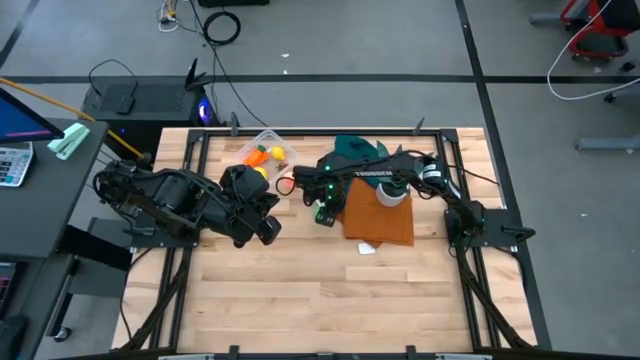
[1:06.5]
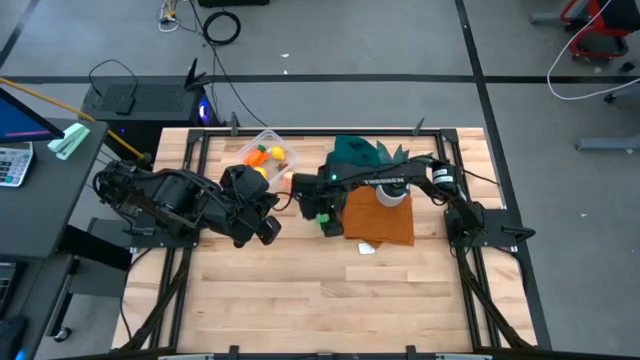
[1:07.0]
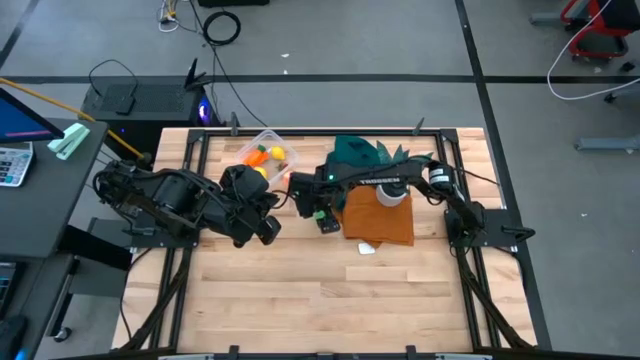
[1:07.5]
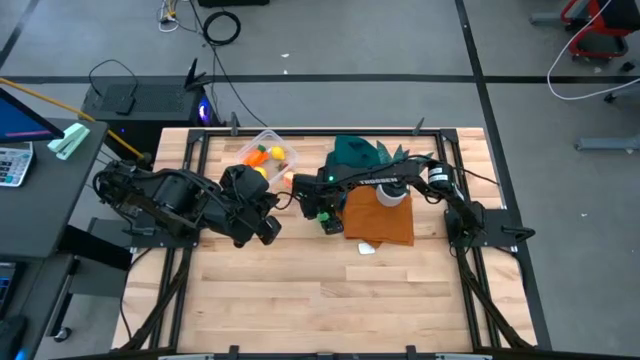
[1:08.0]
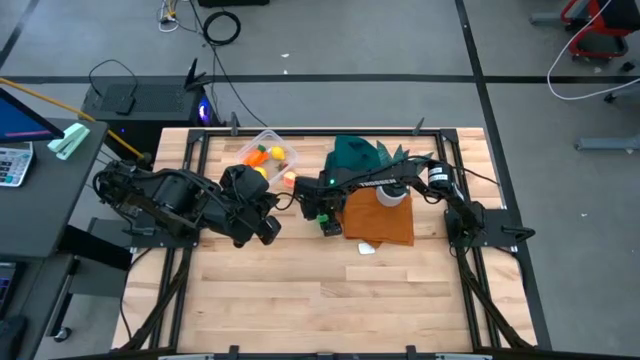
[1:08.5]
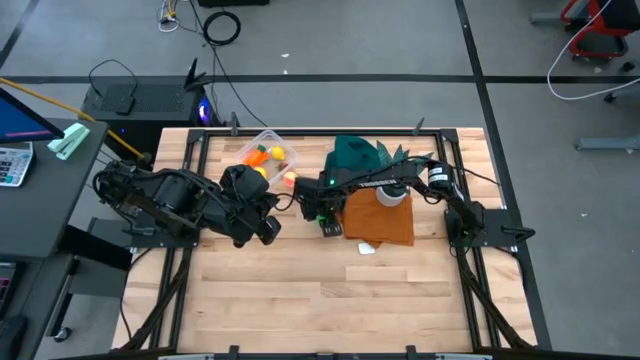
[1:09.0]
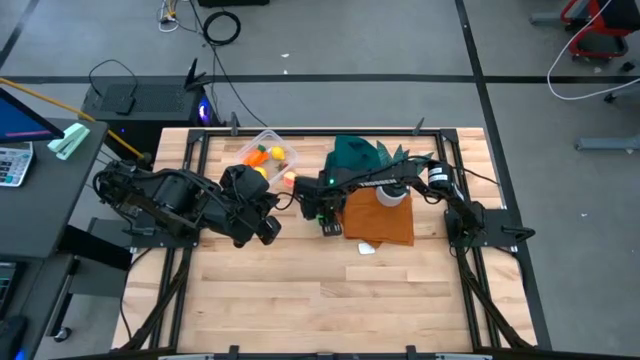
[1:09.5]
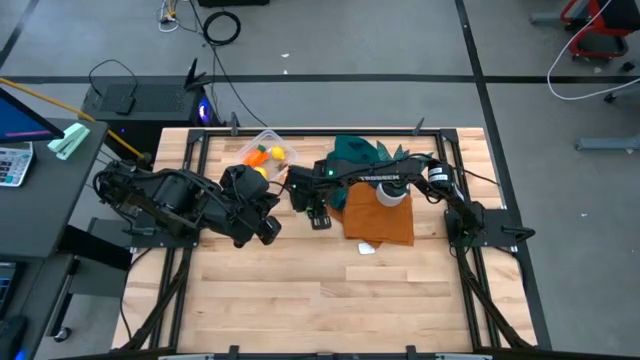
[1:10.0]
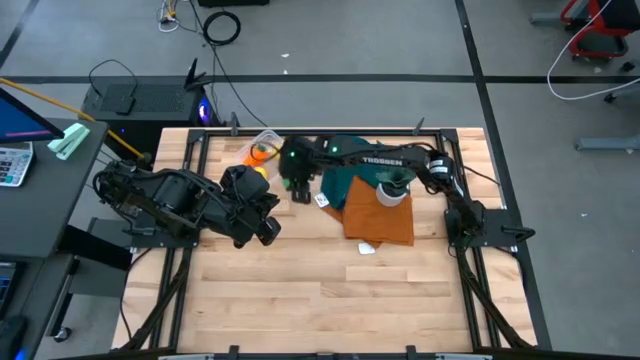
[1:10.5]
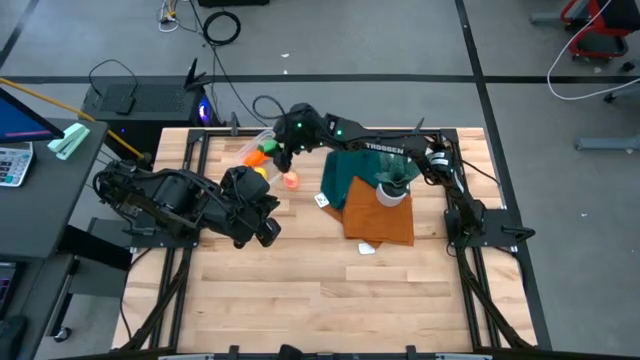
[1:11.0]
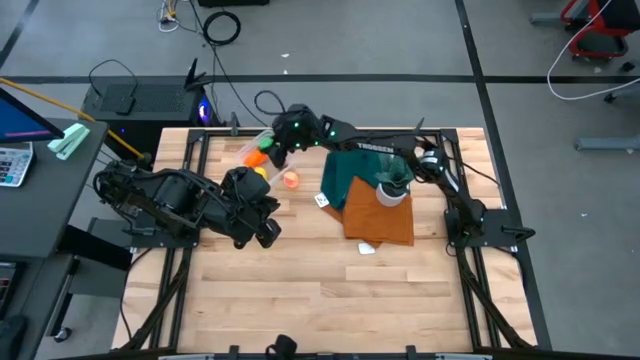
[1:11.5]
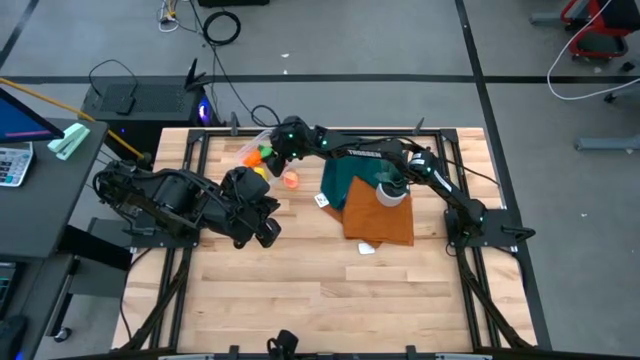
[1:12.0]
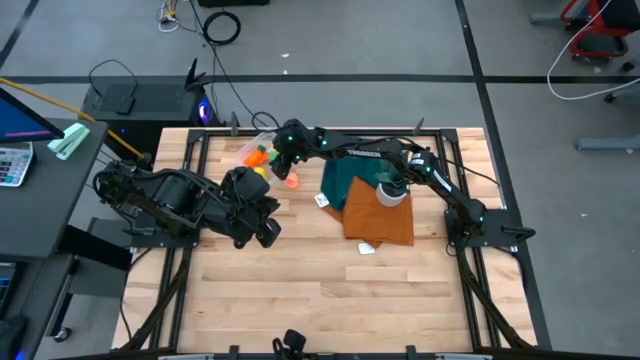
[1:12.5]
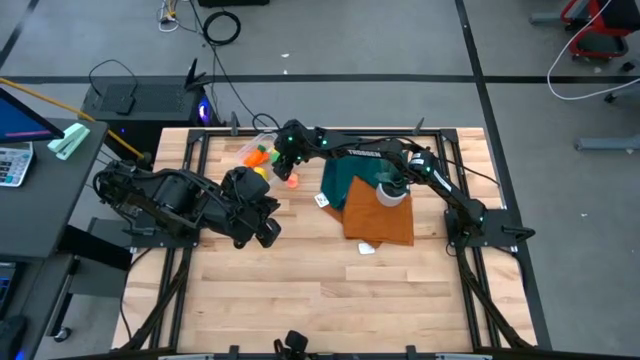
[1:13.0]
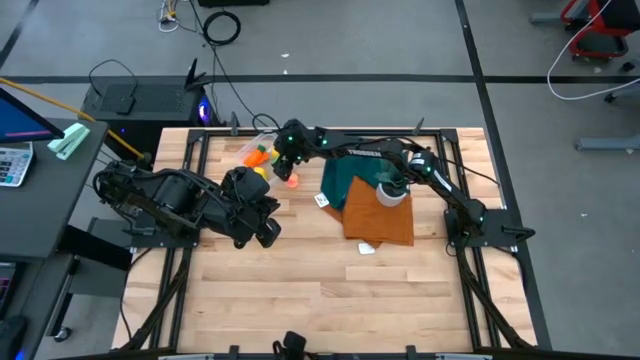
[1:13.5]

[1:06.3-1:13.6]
Task: Pick and placing Produce into tupperware
Put the pear into the transparent container

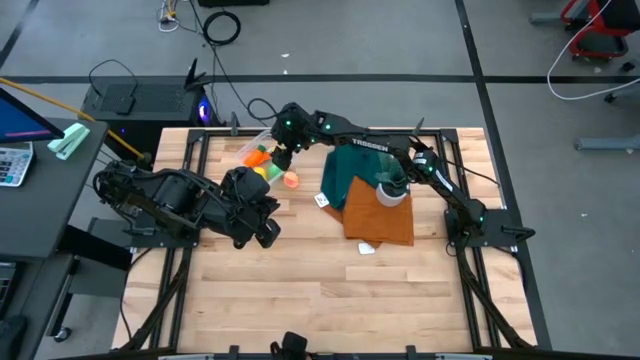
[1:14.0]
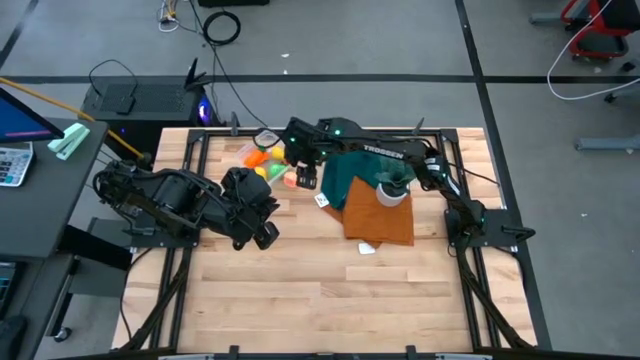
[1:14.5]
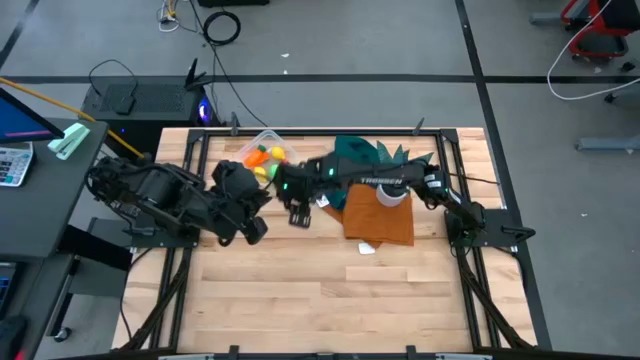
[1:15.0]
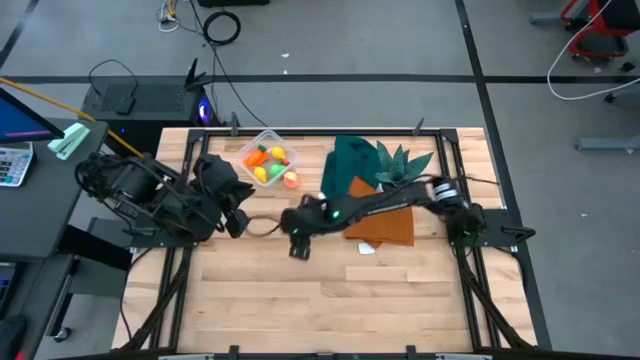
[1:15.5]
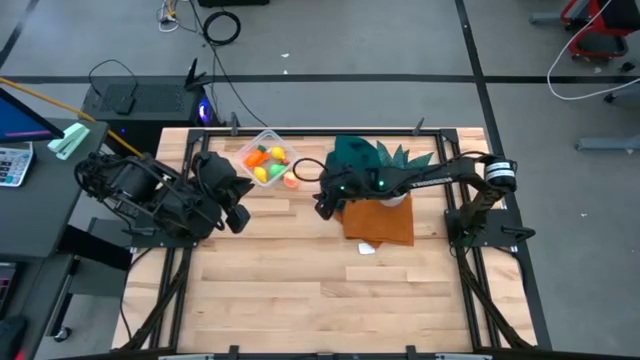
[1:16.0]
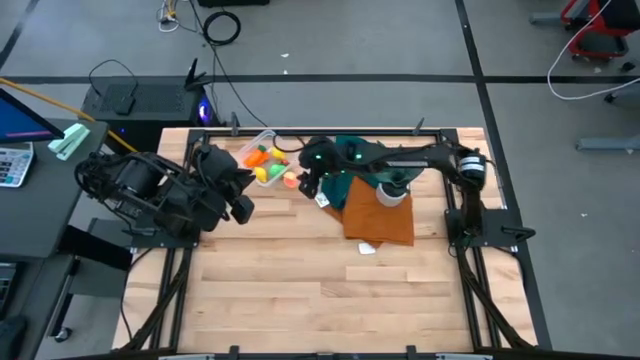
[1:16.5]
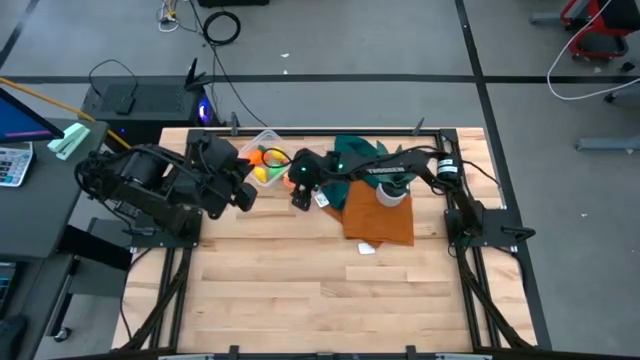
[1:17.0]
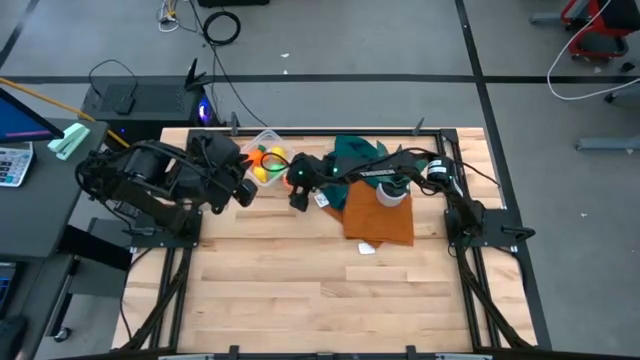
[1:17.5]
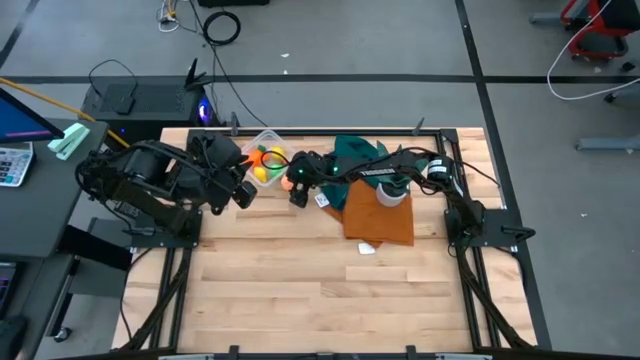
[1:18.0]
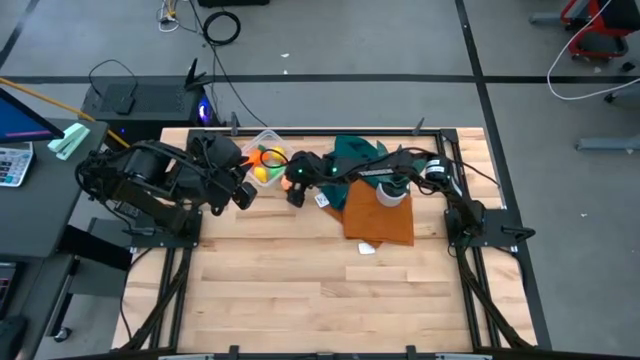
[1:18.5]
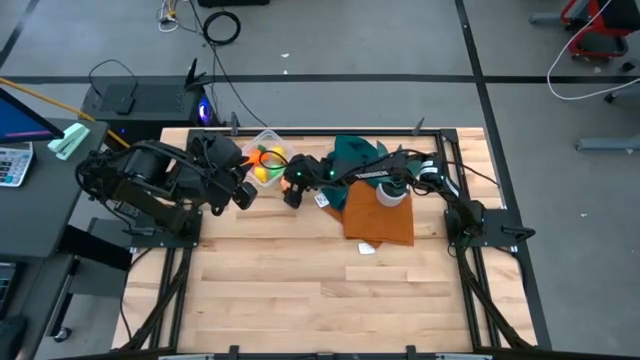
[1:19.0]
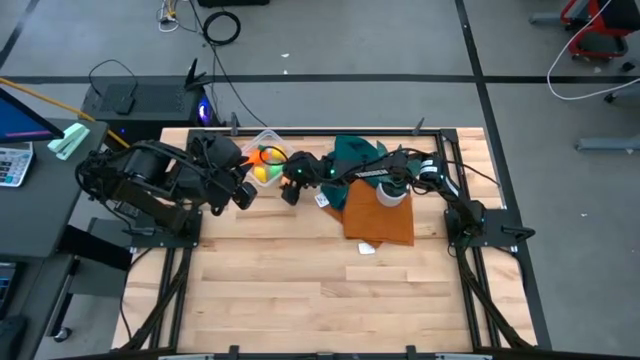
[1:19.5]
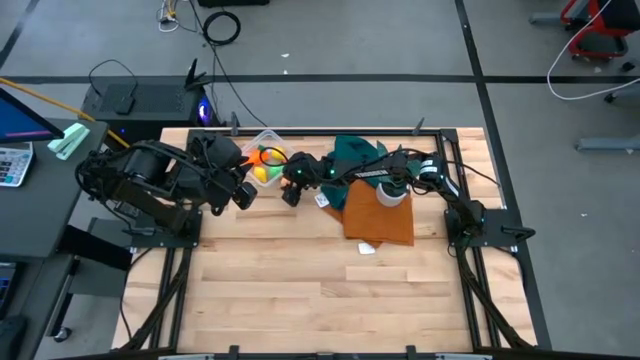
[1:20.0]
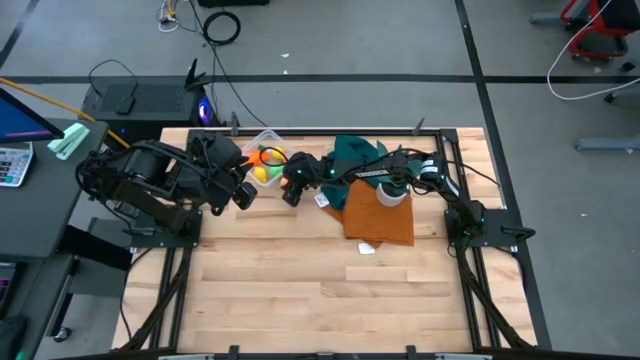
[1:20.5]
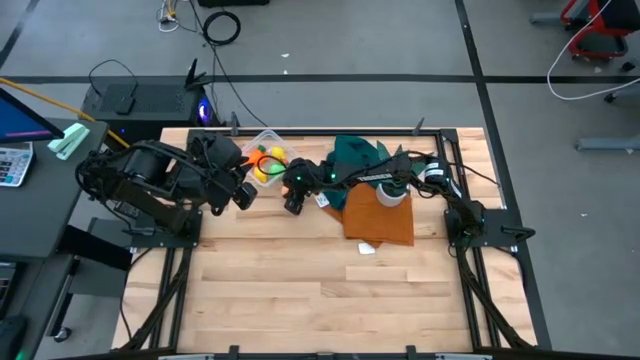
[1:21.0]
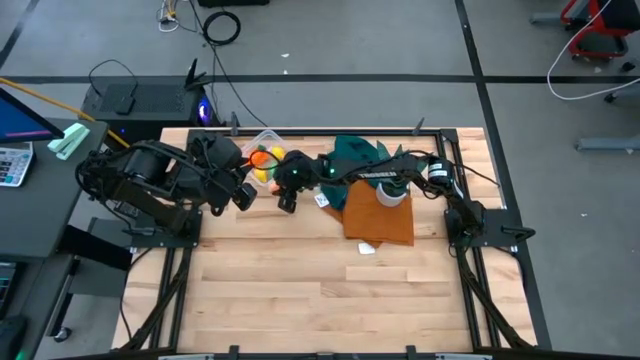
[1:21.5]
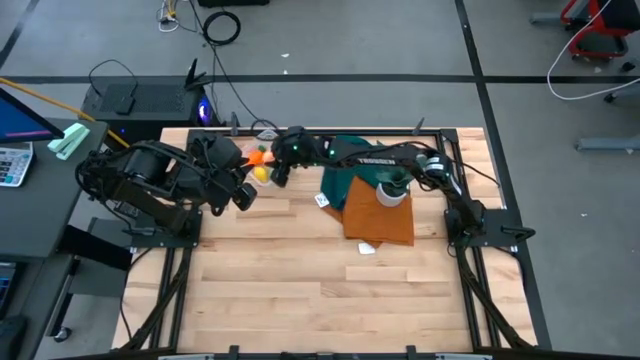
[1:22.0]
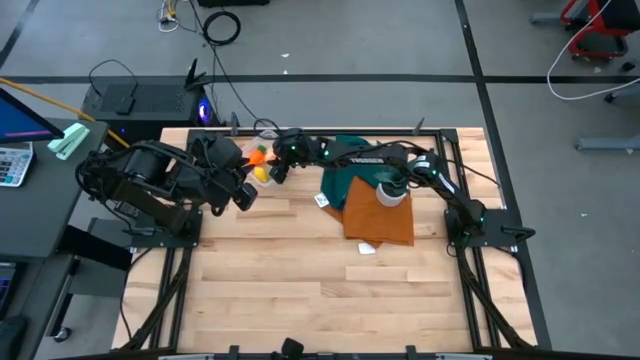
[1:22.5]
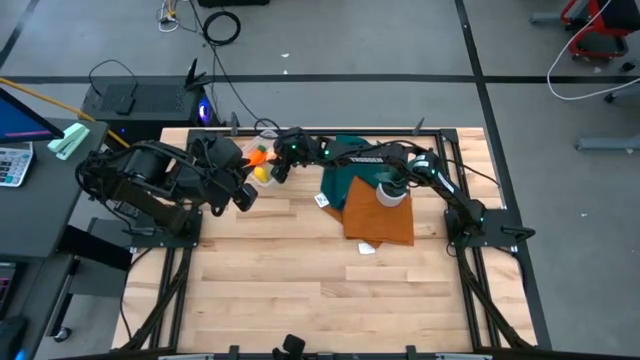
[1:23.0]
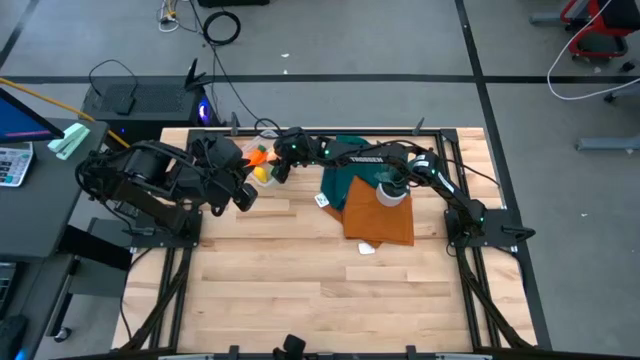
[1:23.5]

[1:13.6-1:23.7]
Put the peach into the transparent container

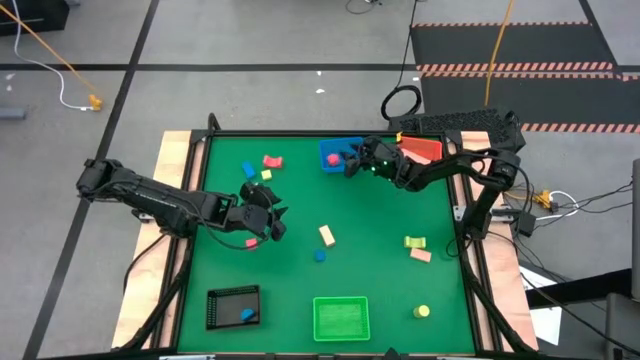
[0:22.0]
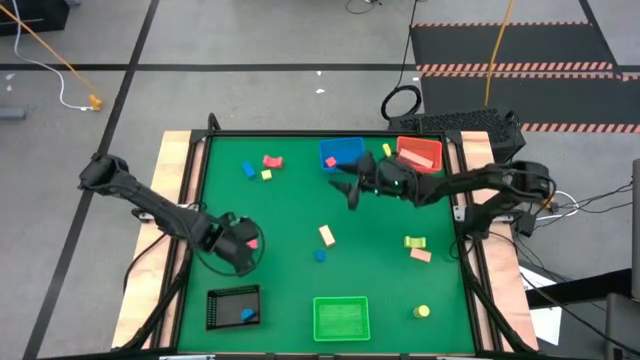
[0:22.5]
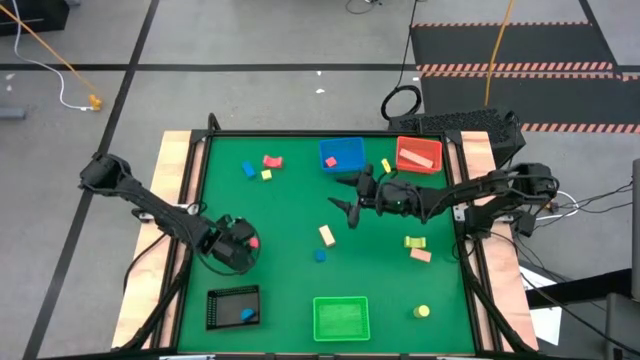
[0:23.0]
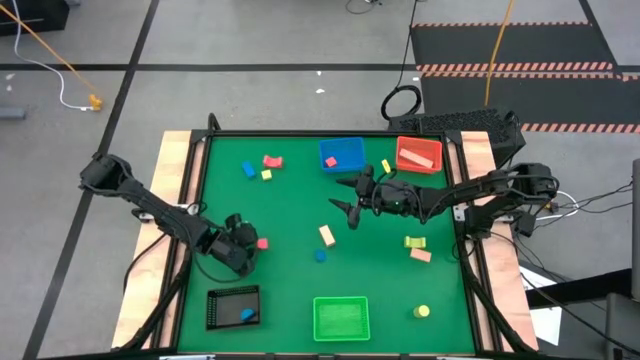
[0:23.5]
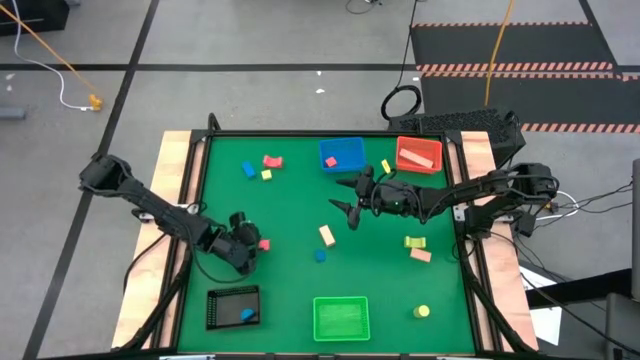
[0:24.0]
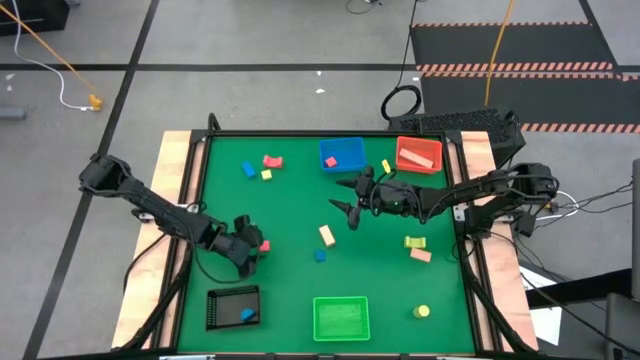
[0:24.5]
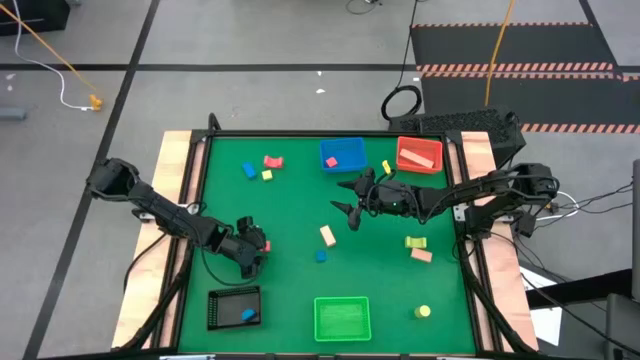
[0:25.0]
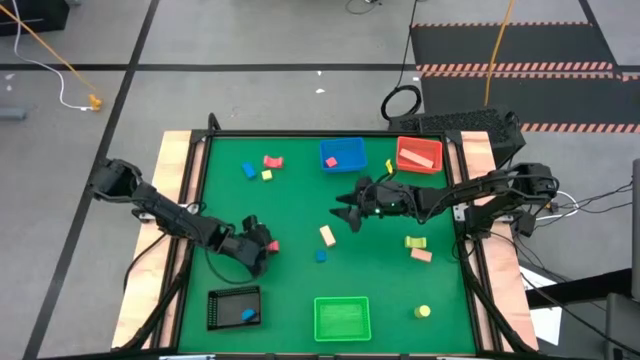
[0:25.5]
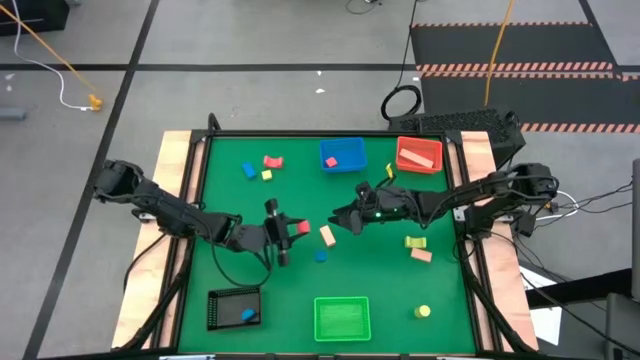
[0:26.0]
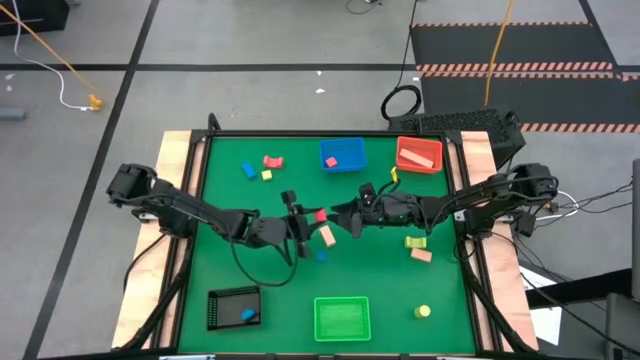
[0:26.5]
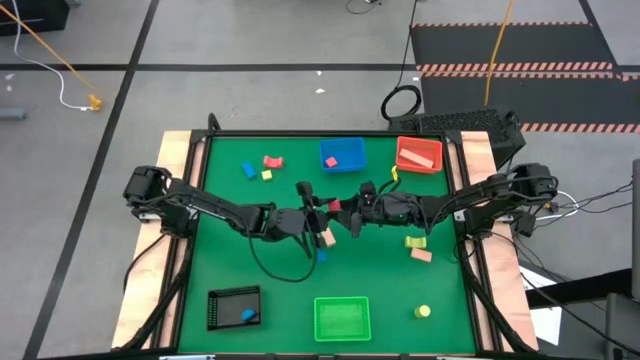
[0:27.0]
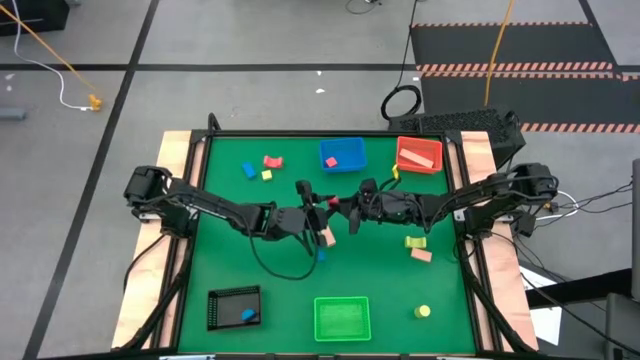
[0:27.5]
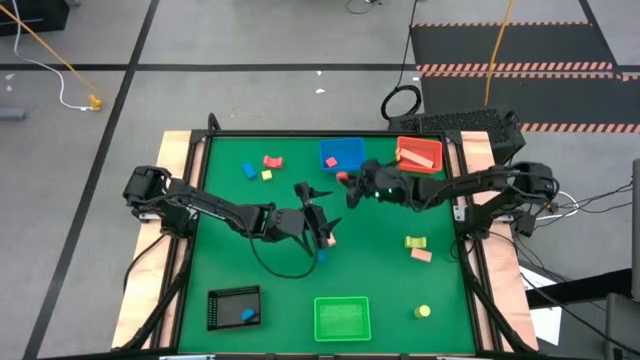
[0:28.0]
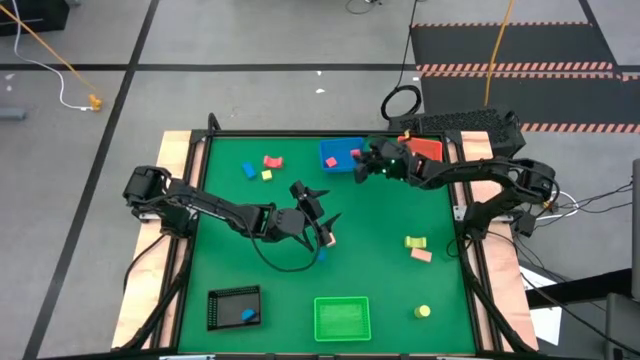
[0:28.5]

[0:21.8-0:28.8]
Task: Sort & place blocks by color
Put the pink block into the blue bin
